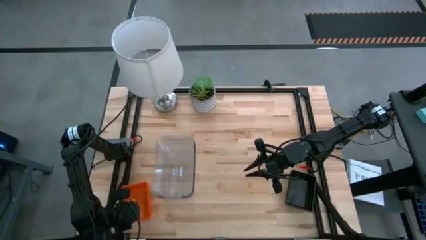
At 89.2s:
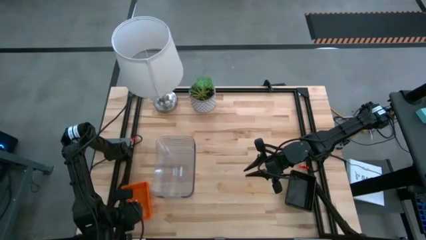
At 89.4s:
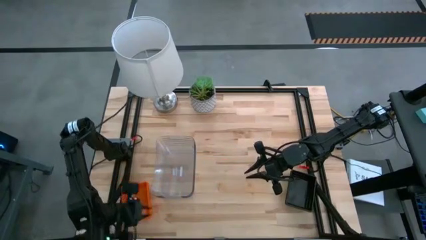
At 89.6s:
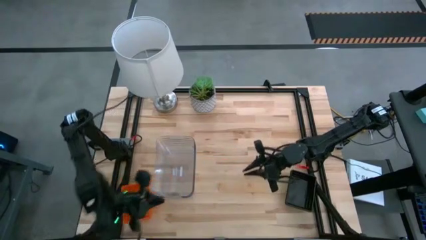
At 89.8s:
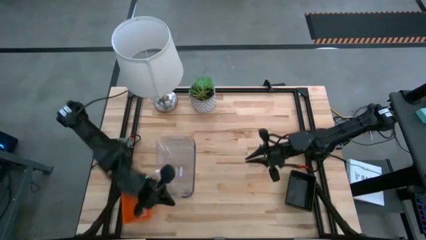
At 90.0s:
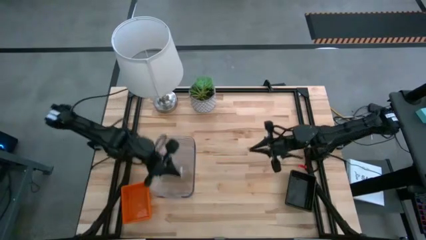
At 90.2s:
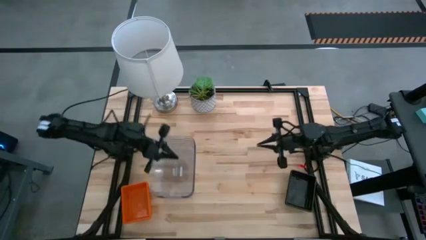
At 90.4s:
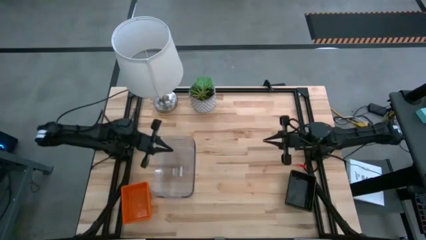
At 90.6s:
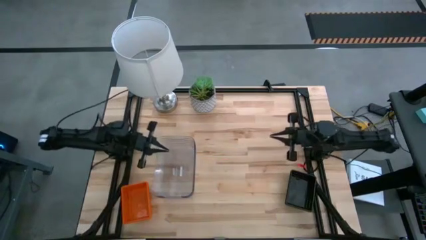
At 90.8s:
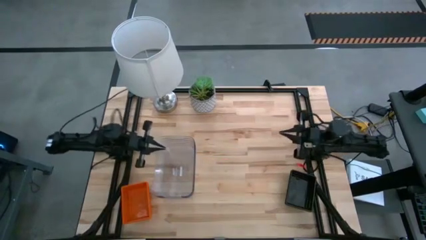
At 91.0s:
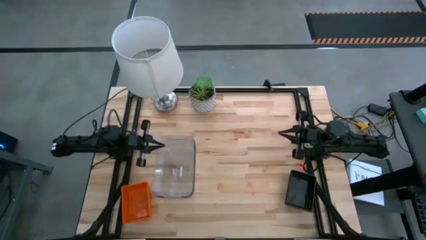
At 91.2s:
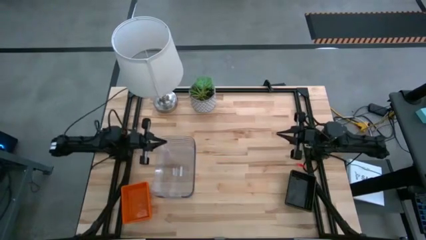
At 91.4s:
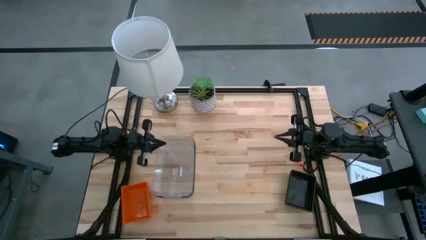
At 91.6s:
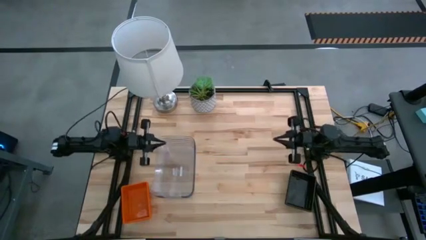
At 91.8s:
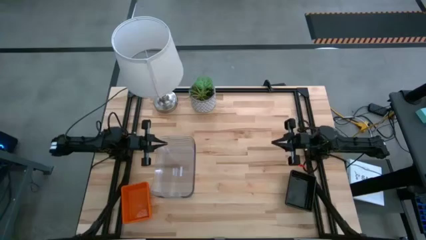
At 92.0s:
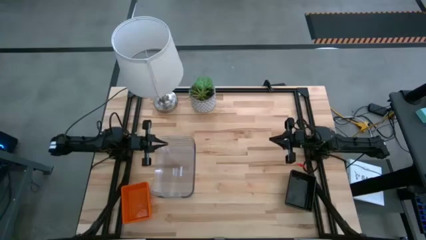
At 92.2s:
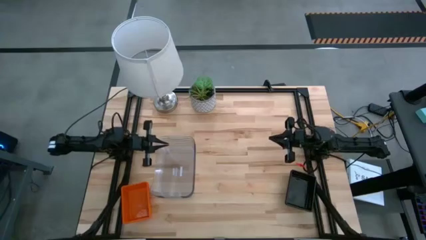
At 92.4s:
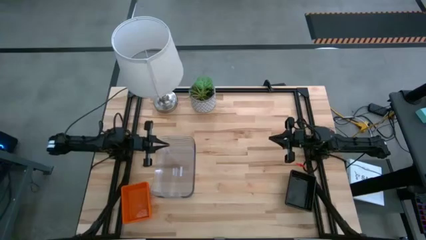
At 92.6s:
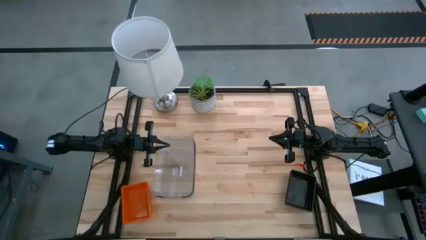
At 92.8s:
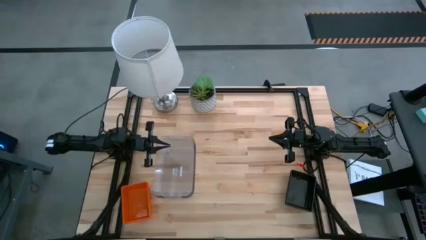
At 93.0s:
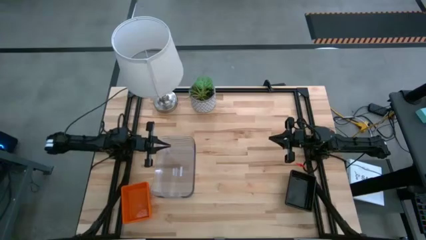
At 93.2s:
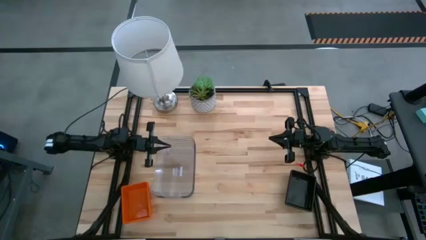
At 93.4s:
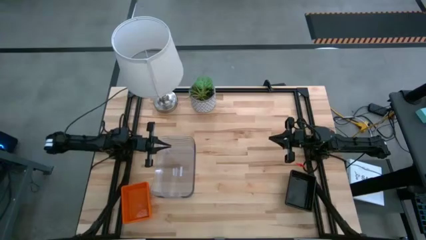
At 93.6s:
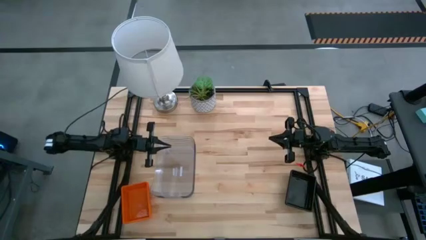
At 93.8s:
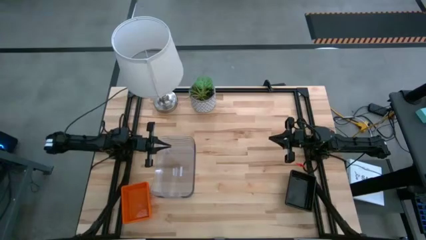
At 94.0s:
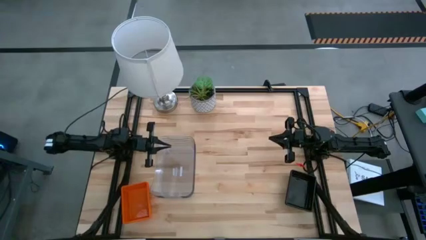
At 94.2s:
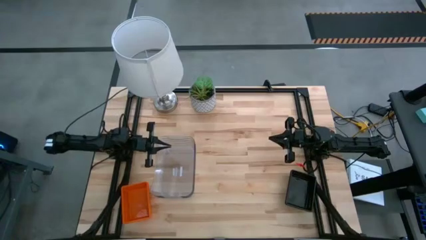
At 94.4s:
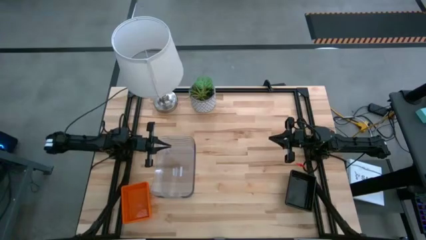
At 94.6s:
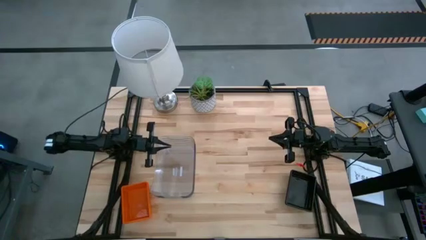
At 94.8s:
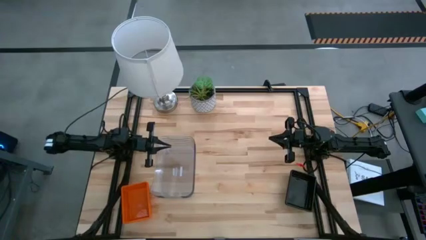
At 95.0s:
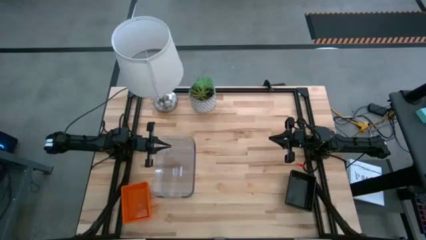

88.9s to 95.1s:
Return to Home Position

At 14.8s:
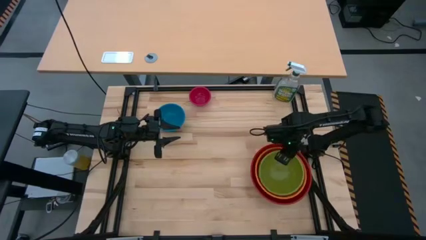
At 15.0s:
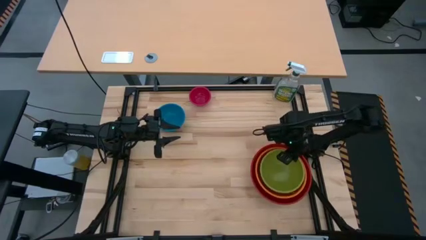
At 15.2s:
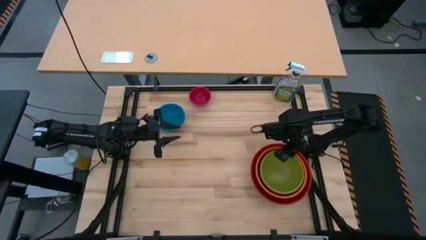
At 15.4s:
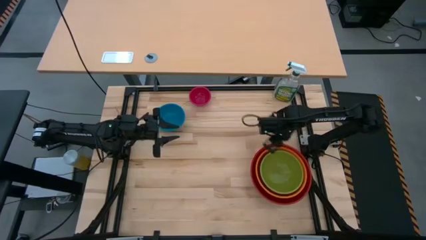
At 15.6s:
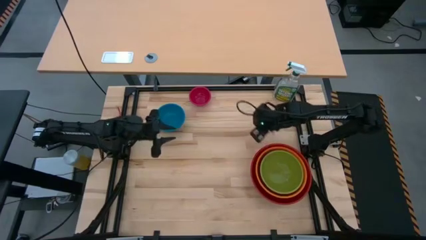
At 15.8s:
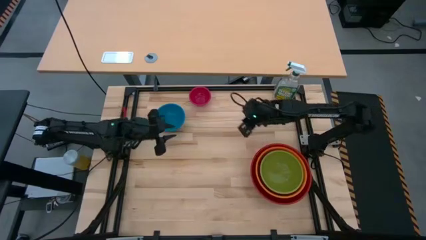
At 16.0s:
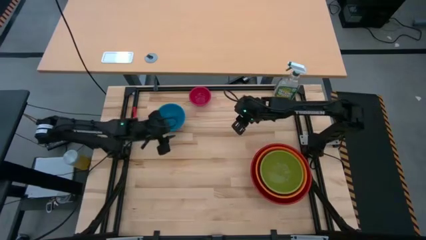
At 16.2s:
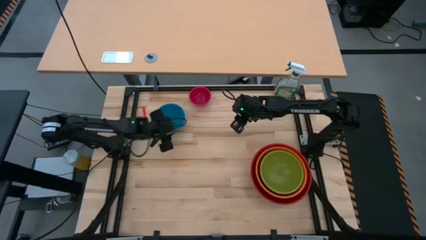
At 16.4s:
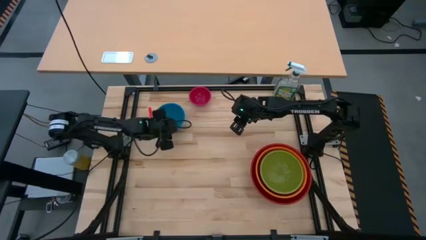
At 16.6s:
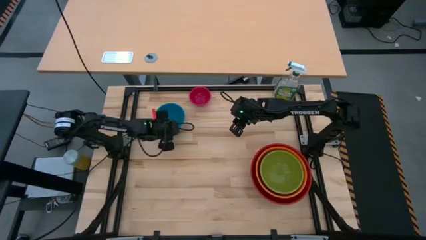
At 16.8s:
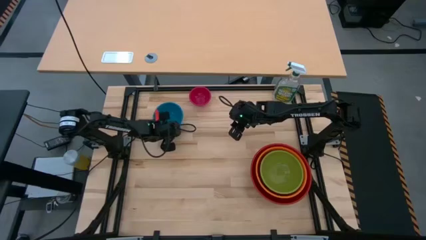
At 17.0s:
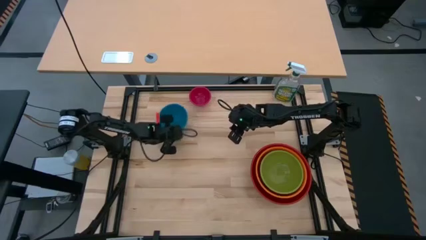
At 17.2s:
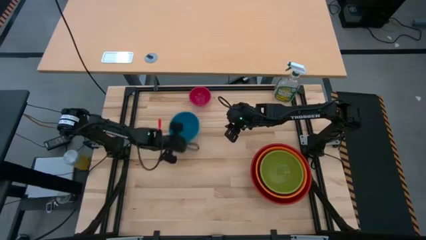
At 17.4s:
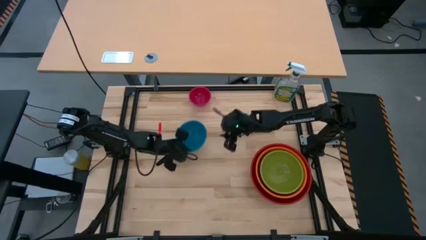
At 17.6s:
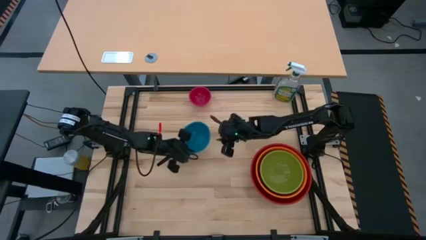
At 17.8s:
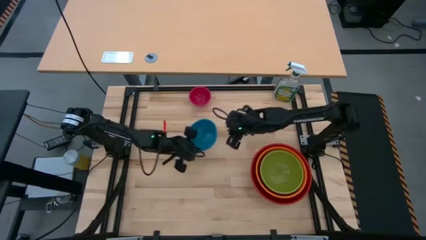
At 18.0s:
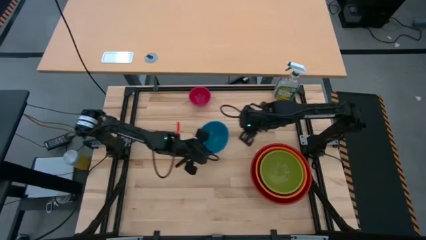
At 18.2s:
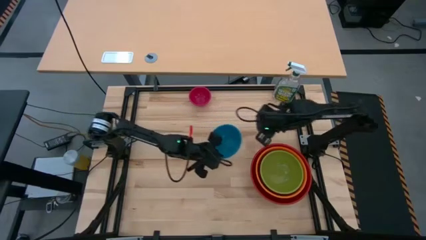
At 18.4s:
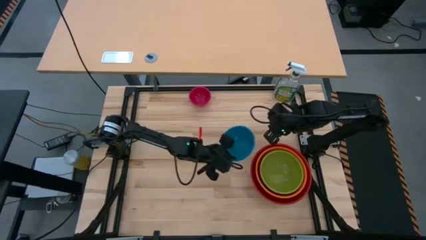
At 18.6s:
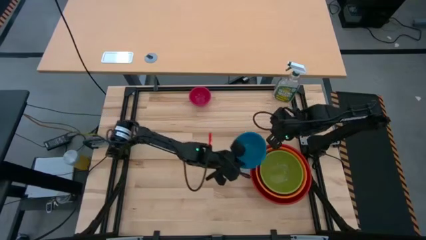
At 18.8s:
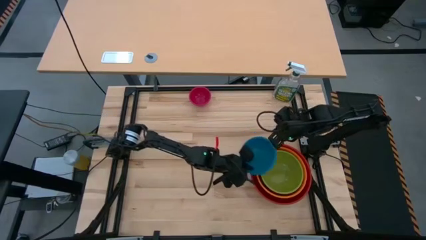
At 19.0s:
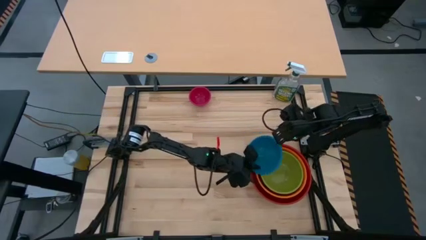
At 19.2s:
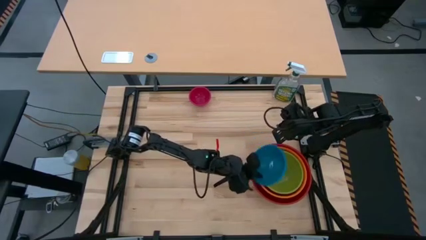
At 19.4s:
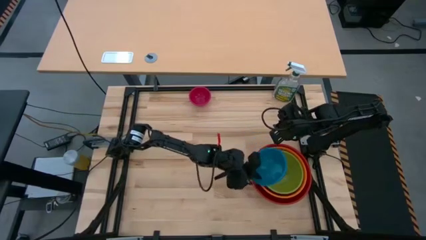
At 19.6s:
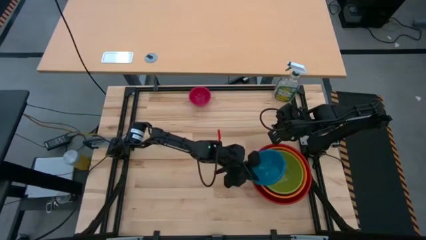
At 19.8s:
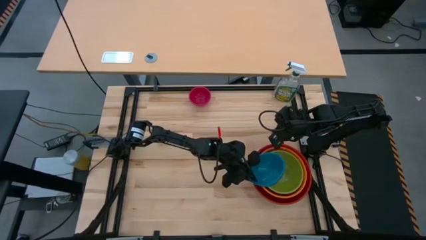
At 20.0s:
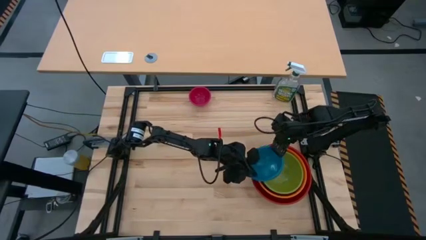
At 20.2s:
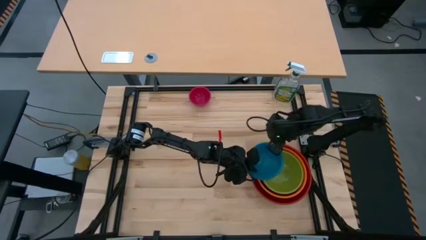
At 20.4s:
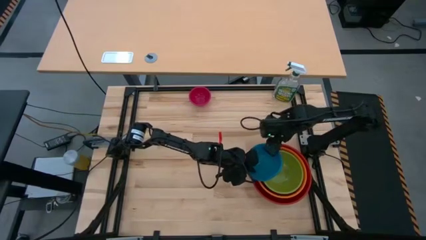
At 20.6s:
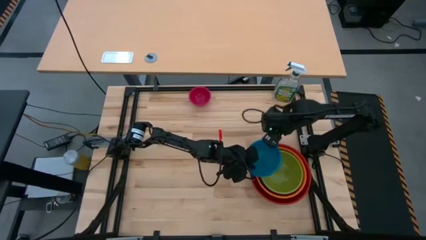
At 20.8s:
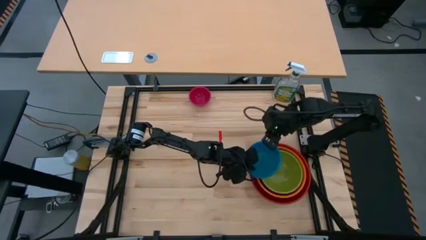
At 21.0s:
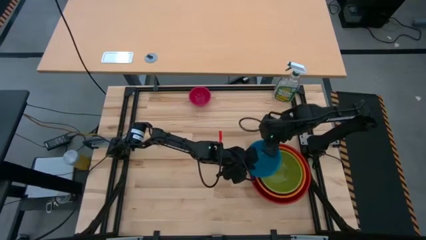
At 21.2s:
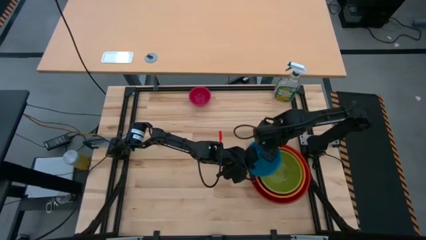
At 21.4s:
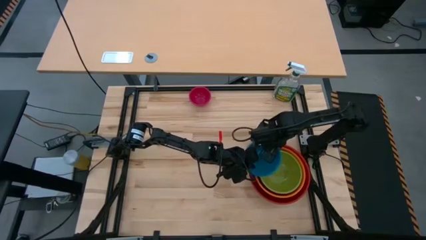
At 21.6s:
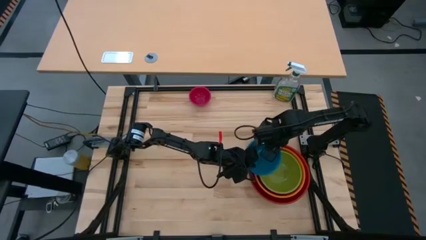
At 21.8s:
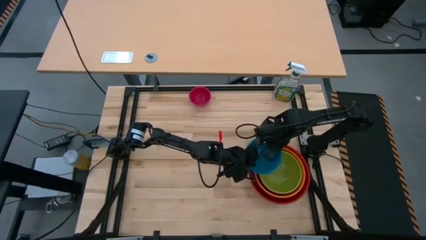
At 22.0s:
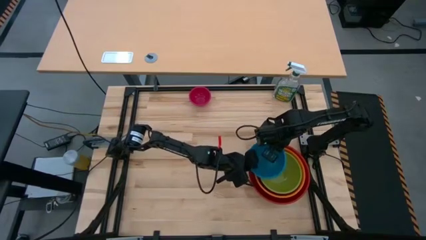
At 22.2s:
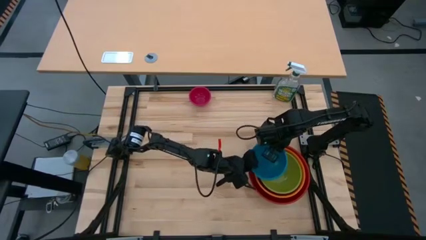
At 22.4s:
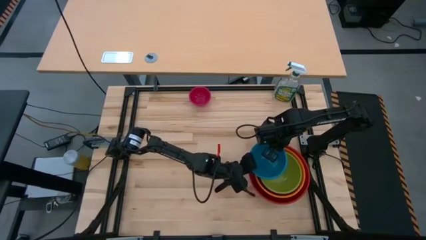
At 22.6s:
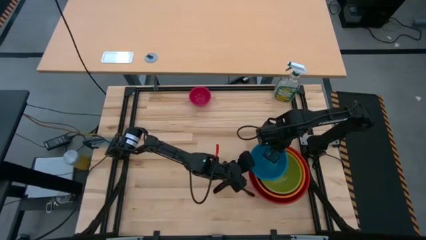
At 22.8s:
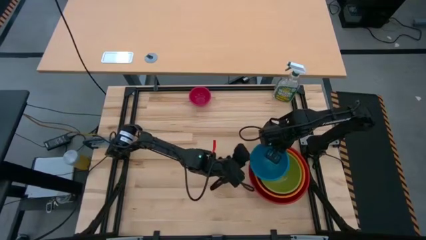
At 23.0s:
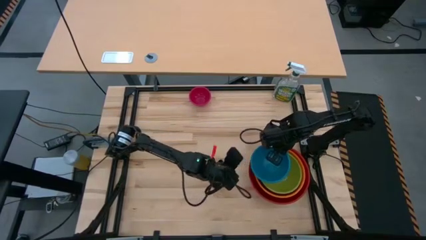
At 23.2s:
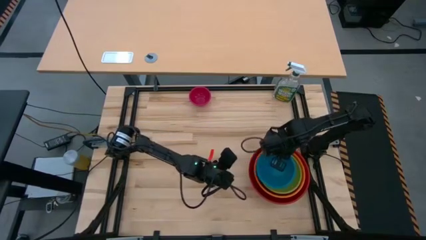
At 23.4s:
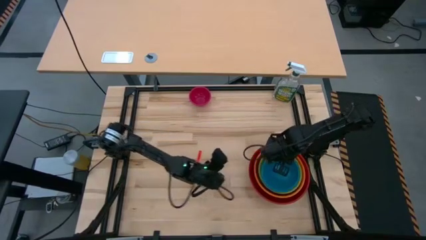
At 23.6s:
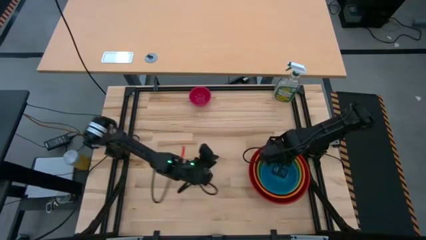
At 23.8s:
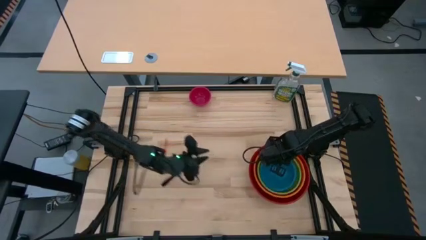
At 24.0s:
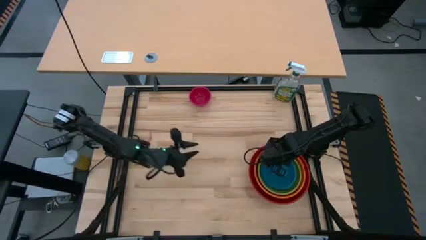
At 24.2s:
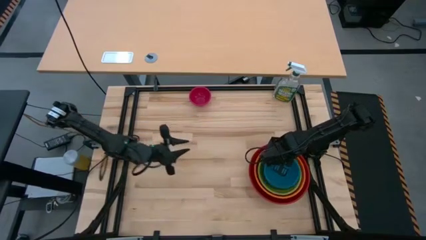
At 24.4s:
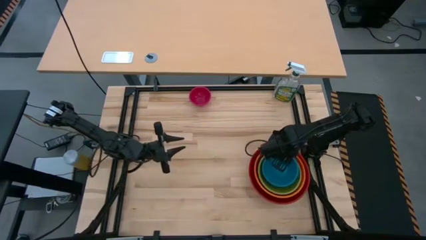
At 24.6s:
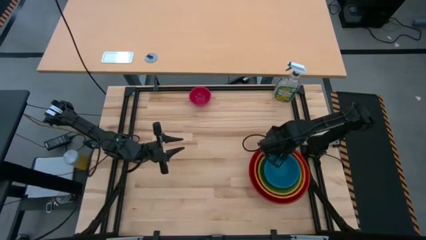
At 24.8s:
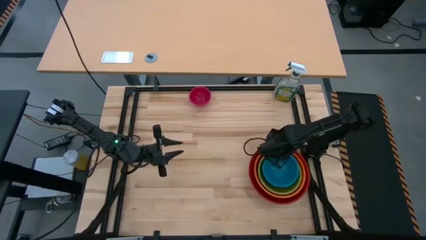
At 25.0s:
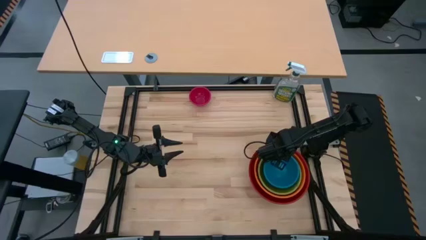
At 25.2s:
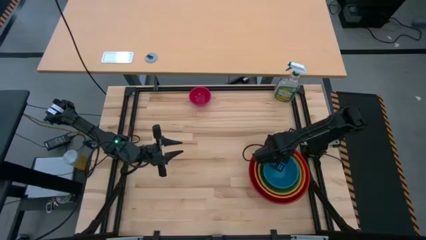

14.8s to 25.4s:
Stack the blue bowl on the green bowl
